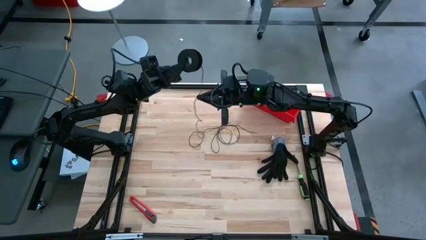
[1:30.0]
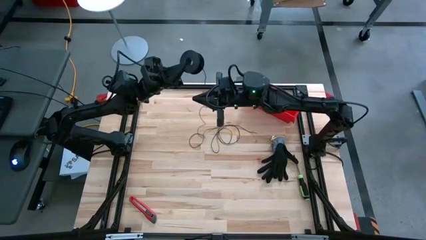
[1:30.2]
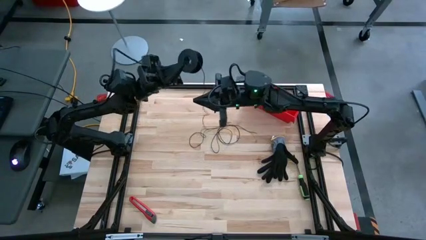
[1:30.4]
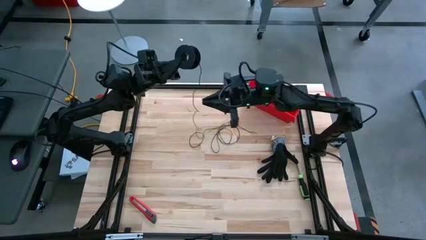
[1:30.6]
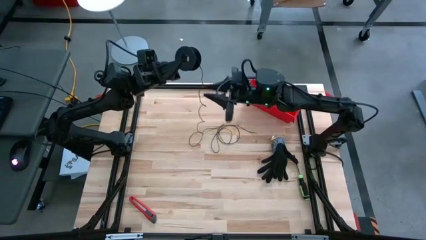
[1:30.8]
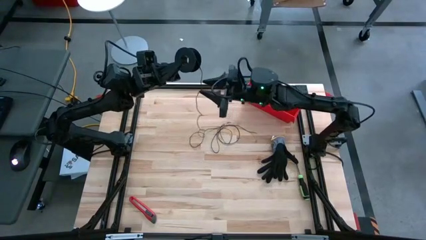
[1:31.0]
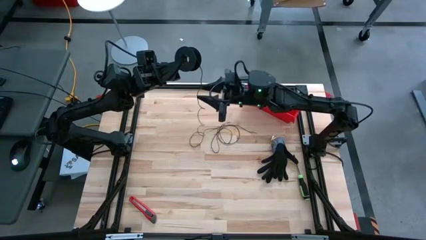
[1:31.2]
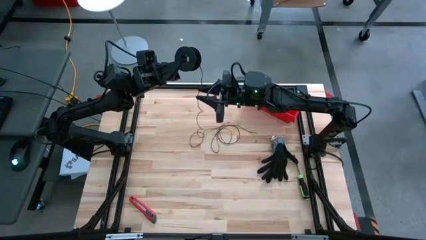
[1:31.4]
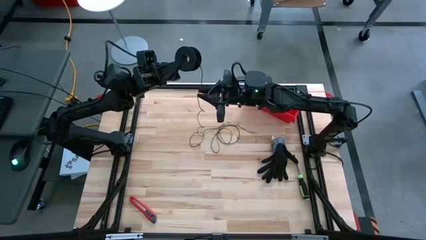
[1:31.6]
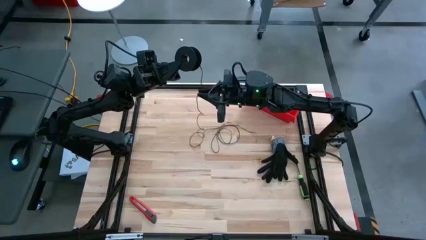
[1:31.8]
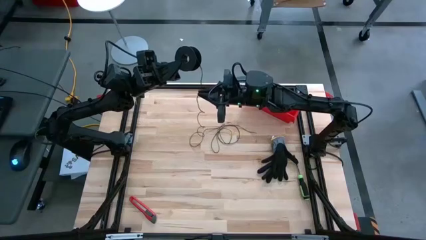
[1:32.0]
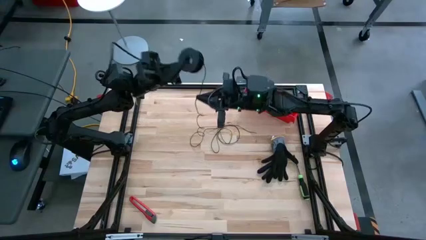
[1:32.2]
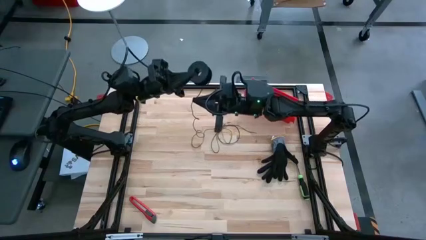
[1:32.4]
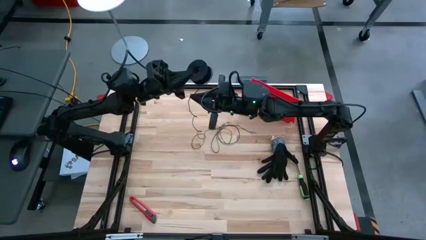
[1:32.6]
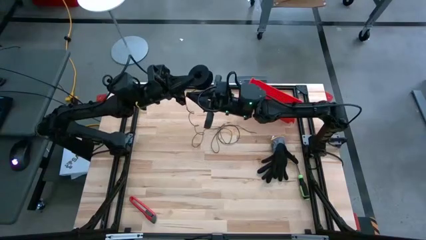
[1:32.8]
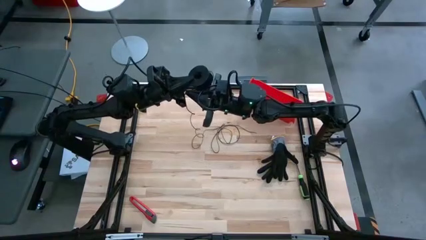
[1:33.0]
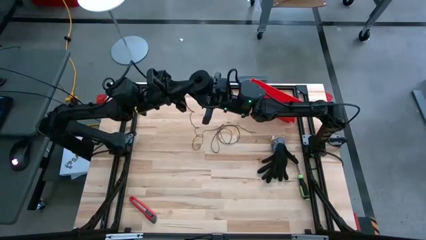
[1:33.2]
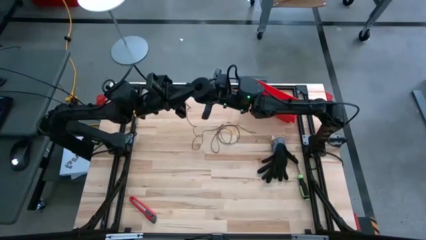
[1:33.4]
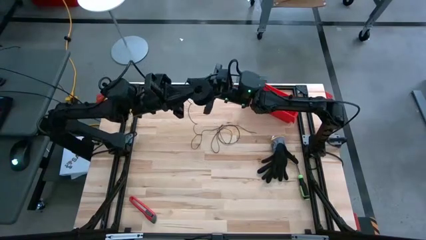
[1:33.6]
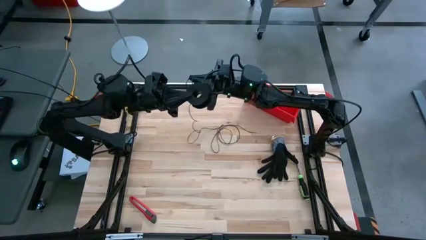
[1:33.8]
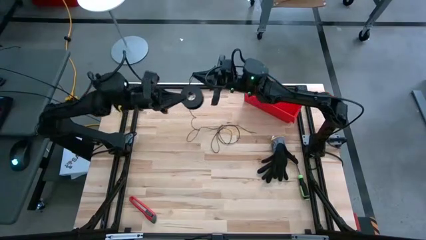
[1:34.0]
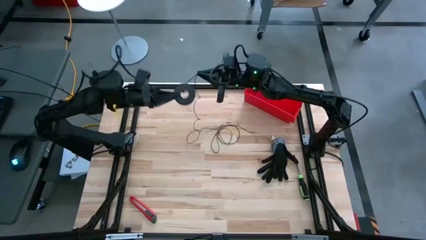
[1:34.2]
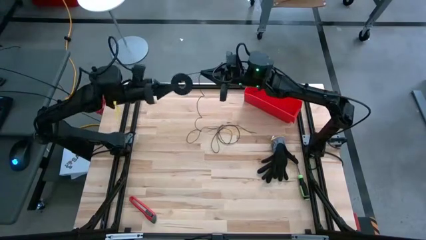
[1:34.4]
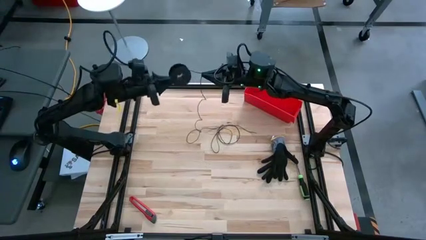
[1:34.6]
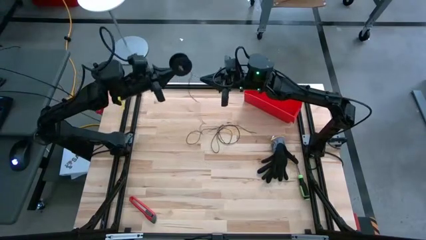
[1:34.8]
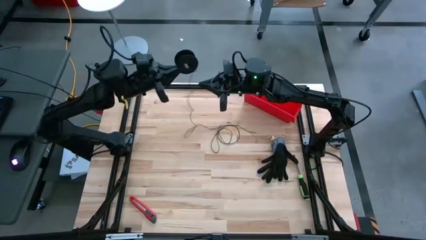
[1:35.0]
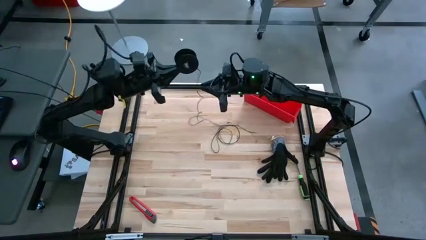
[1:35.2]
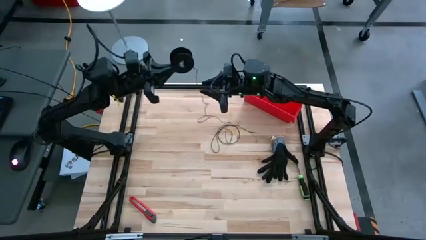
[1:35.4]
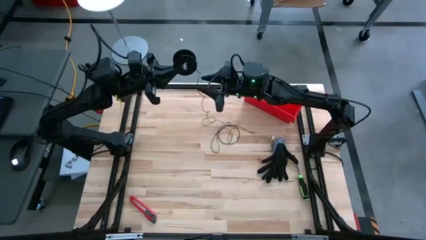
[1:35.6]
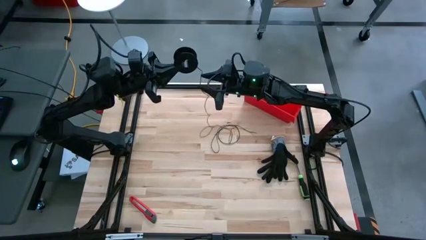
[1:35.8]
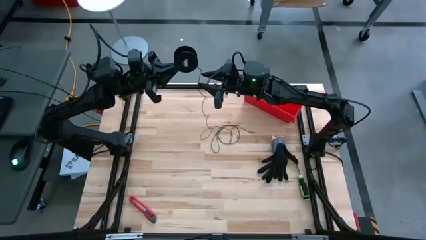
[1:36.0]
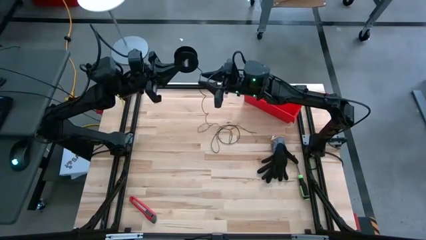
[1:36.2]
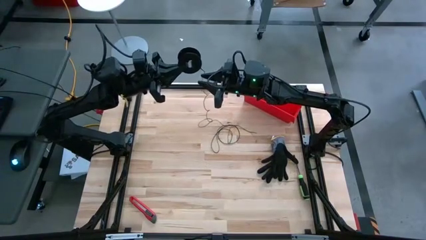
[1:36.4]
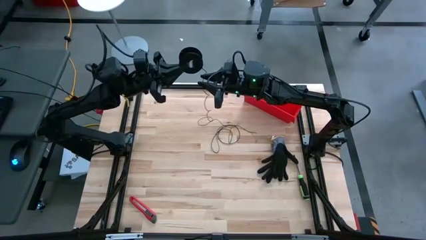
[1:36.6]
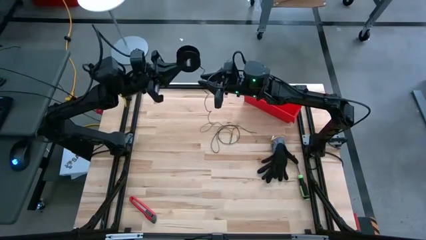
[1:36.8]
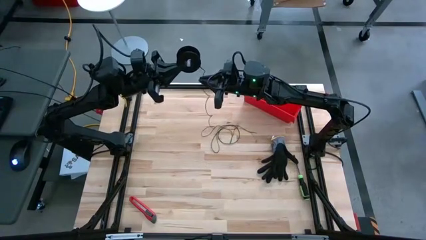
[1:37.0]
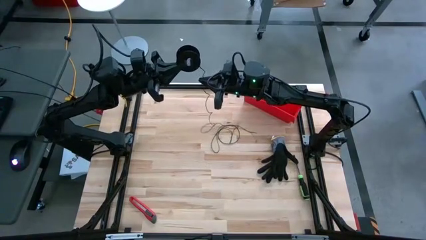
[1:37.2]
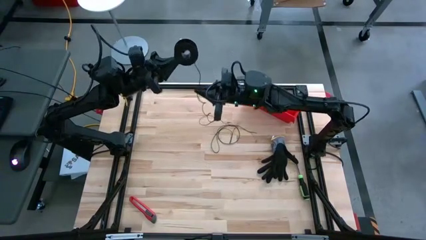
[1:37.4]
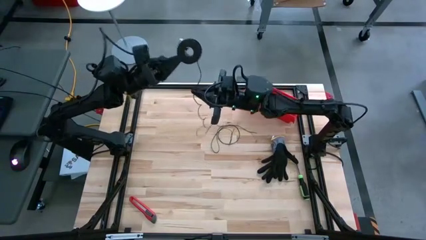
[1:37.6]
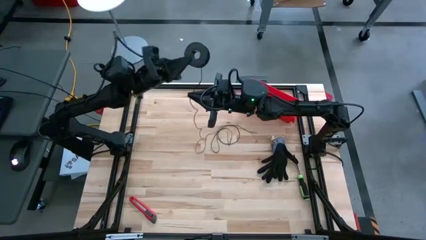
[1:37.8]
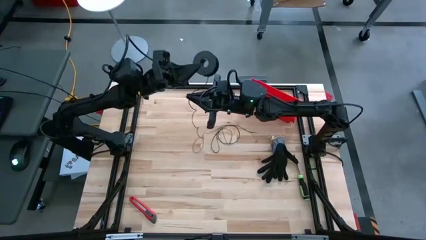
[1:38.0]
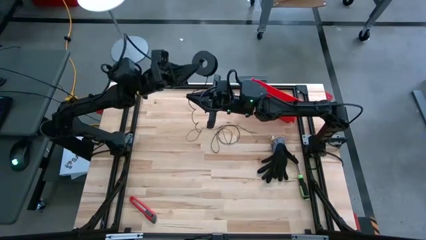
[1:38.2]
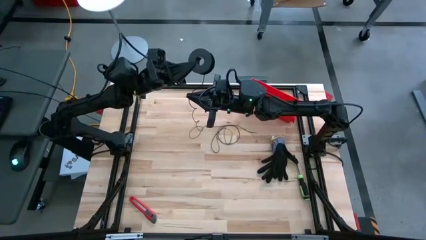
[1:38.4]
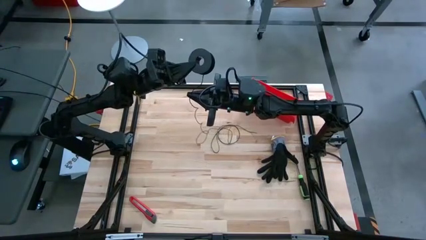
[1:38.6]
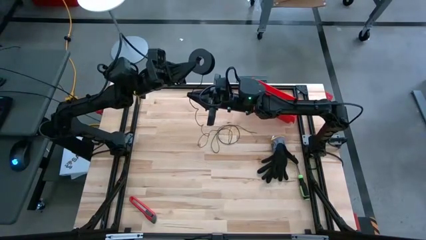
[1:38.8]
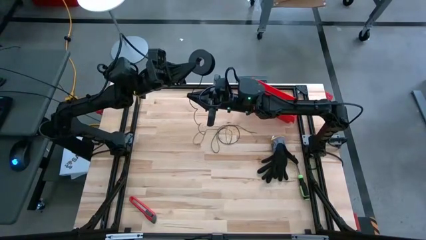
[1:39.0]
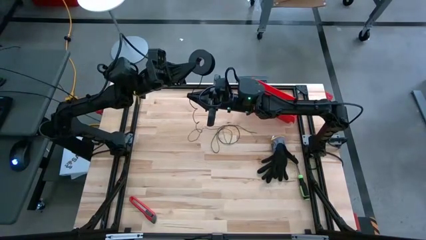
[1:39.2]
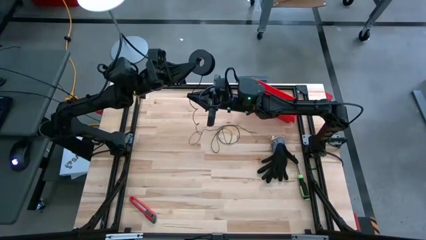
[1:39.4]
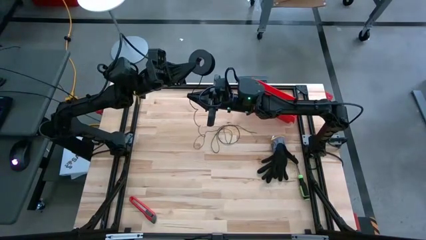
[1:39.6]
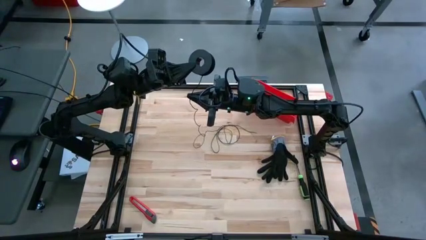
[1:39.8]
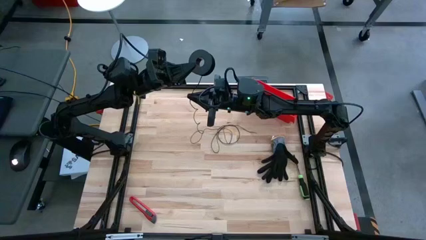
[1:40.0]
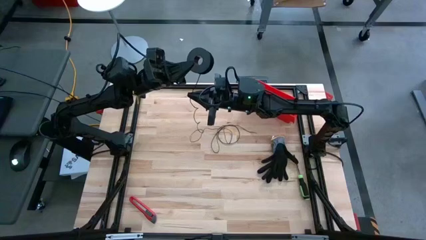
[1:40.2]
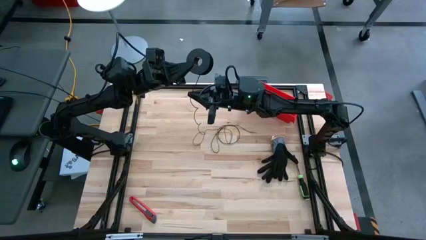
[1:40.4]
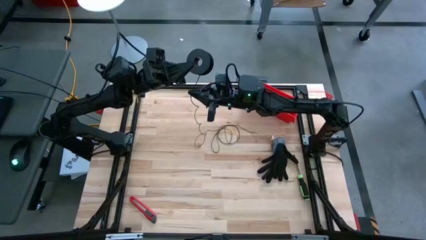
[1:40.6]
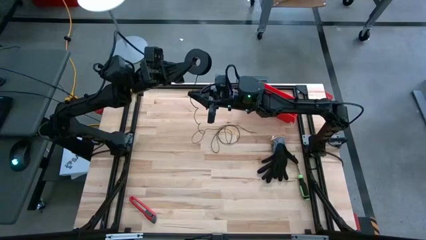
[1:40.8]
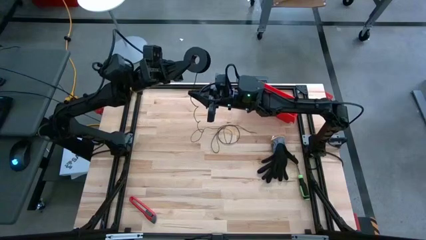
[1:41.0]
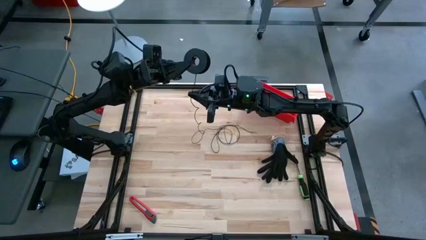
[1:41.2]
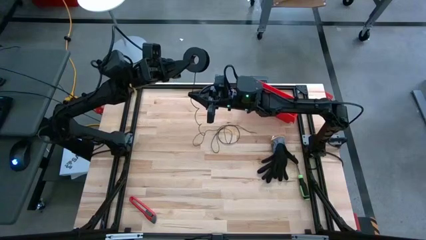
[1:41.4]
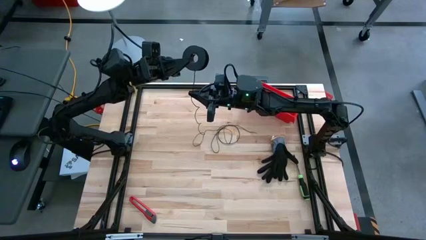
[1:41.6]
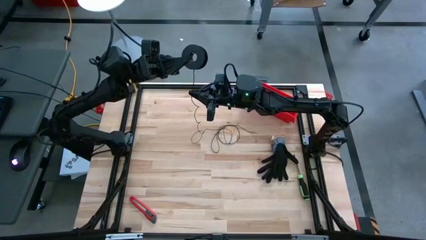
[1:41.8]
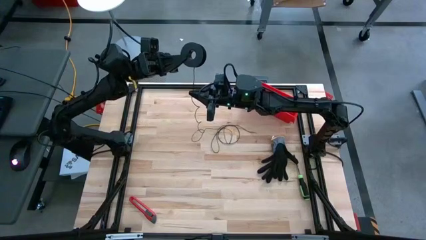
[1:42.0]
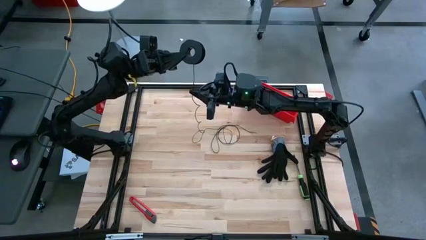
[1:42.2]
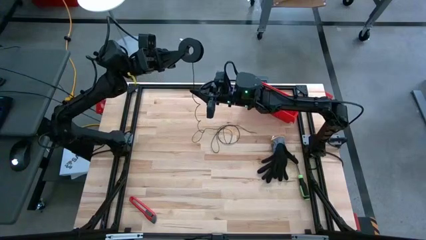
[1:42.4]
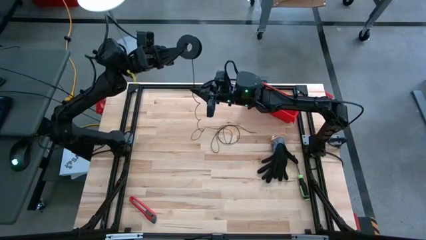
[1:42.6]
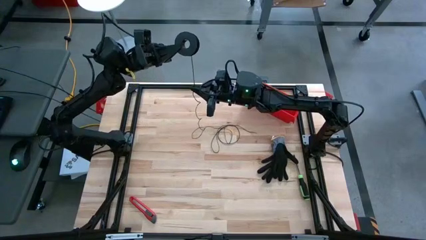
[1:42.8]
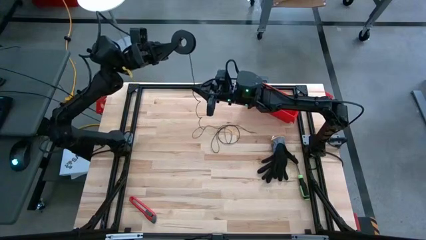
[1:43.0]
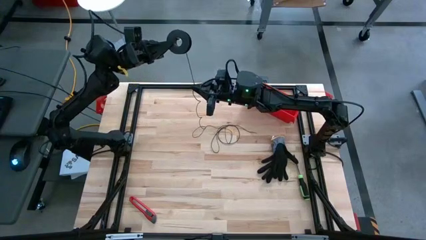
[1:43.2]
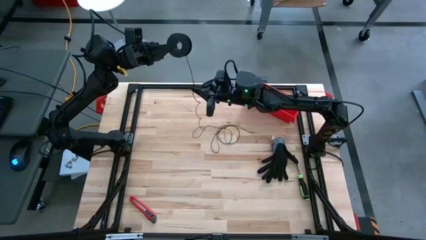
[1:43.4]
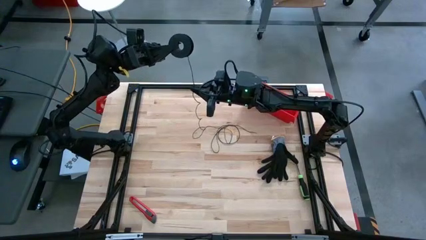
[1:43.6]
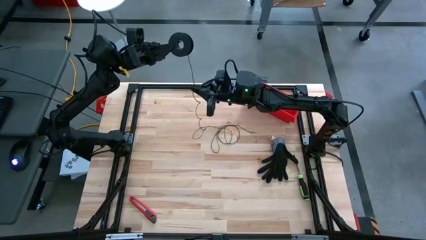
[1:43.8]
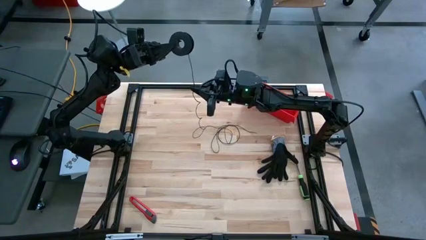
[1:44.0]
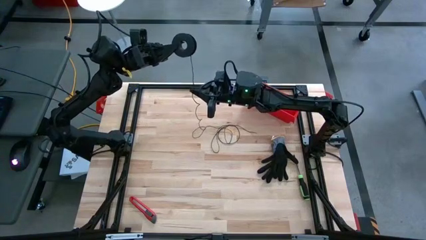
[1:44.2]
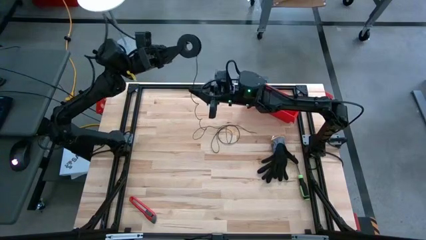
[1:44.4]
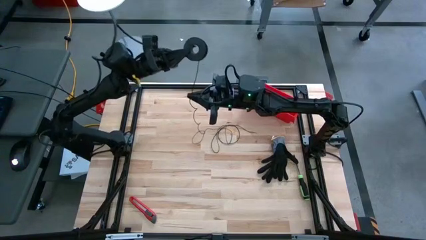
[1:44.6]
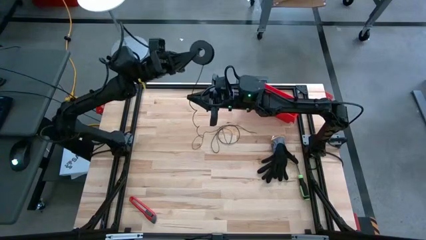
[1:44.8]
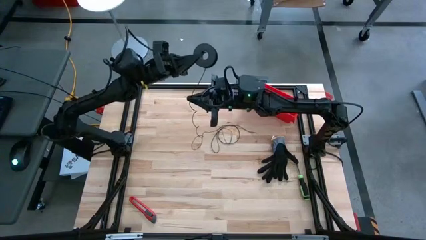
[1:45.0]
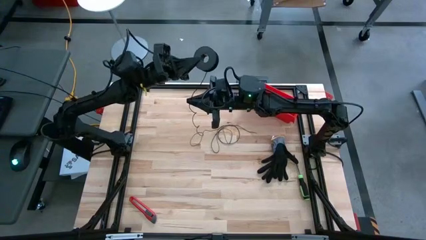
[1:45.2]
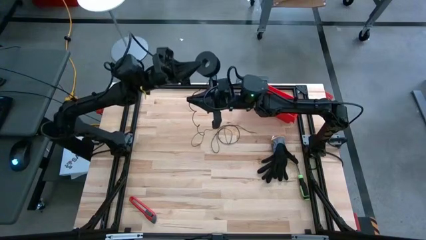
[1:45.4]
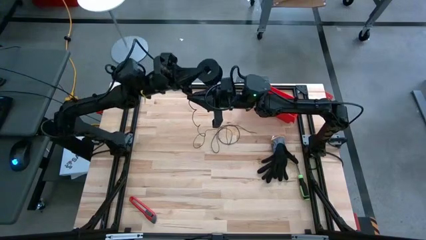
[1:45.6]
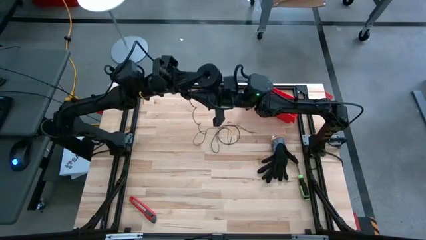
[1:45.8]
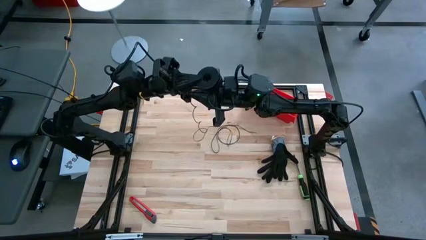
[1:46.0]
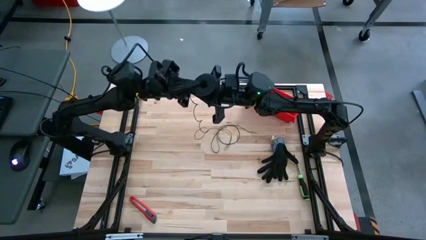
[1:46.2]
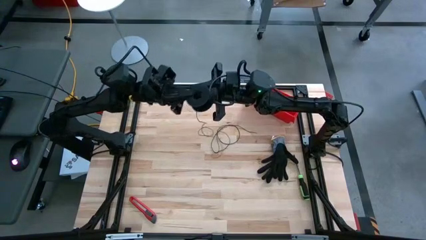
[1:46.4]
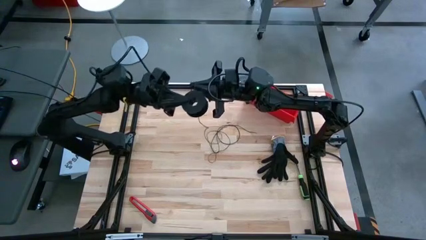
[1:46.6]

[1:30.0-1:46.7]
Task: Coil cords
Coil the black wire on the spool
